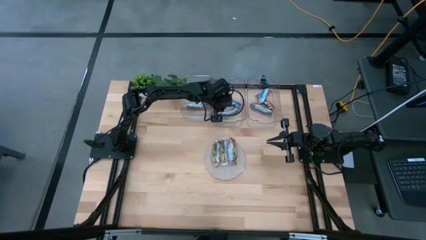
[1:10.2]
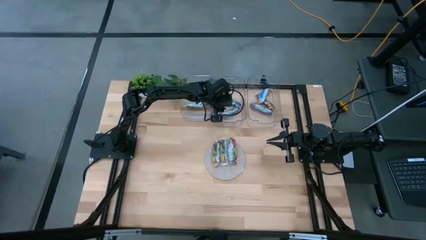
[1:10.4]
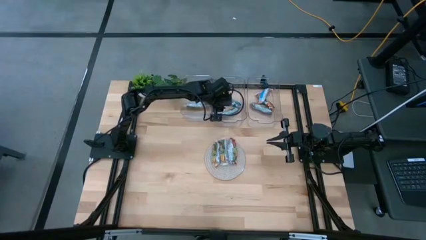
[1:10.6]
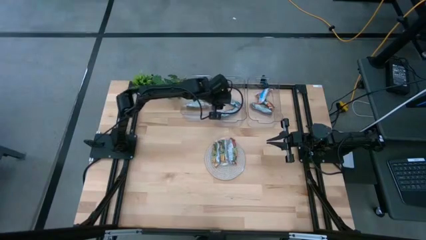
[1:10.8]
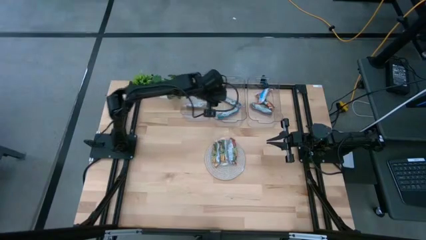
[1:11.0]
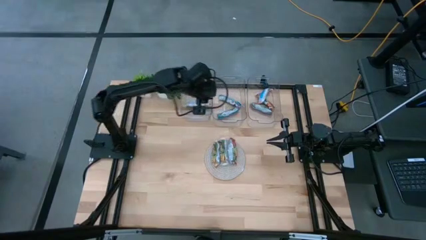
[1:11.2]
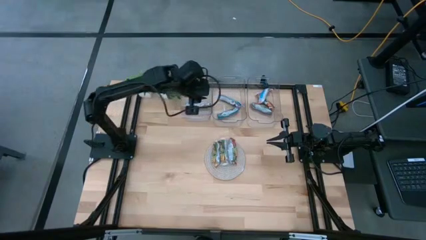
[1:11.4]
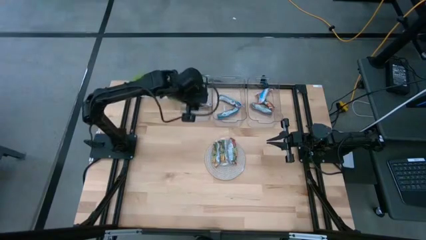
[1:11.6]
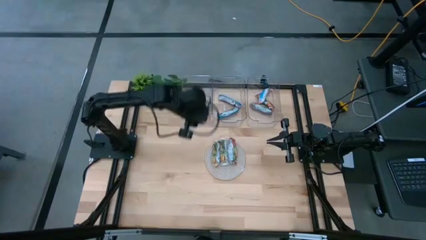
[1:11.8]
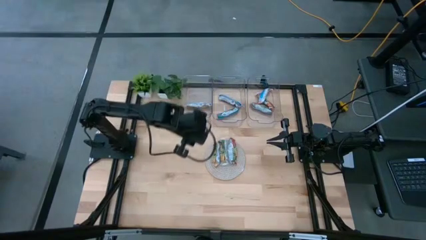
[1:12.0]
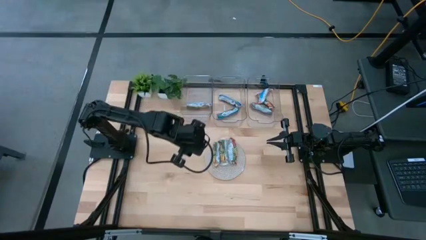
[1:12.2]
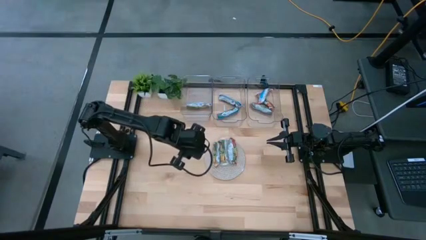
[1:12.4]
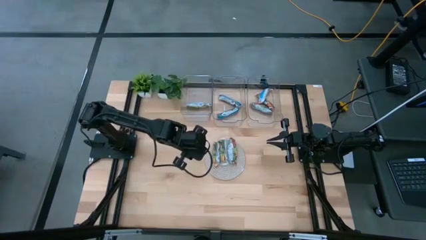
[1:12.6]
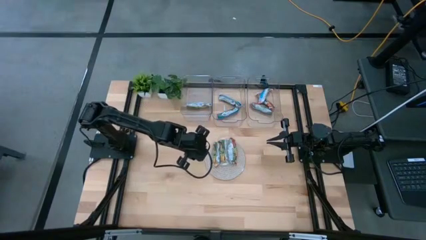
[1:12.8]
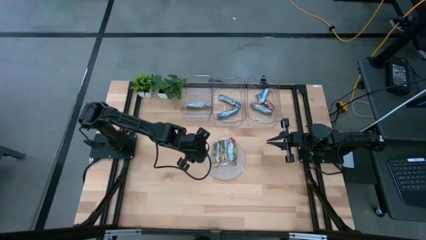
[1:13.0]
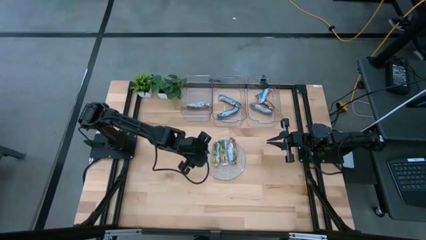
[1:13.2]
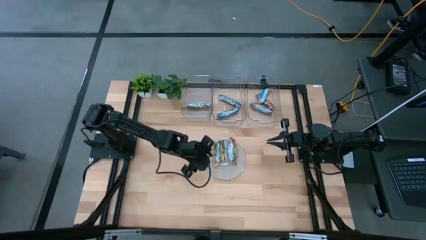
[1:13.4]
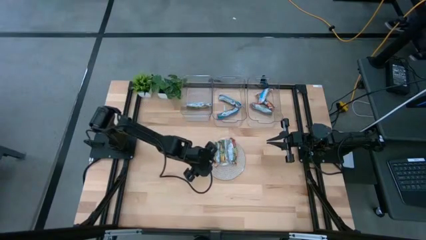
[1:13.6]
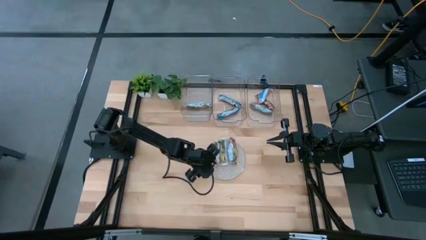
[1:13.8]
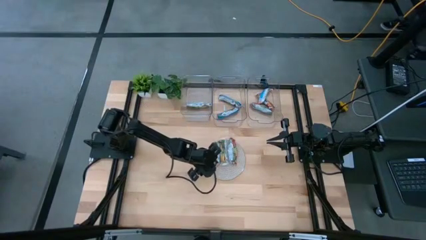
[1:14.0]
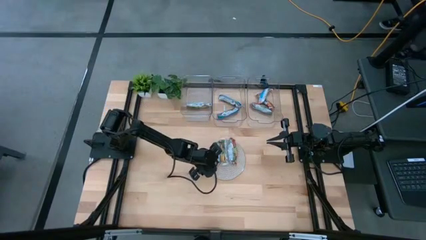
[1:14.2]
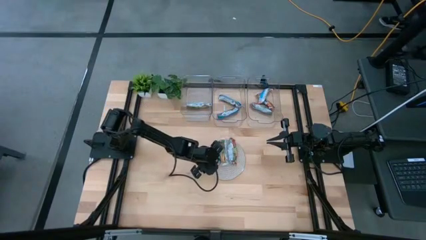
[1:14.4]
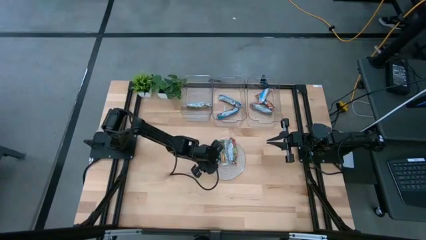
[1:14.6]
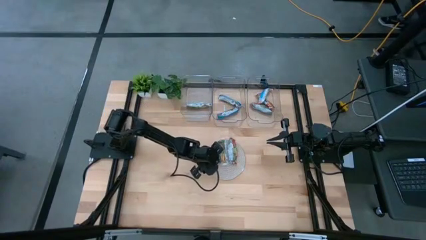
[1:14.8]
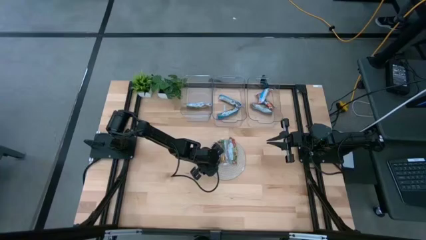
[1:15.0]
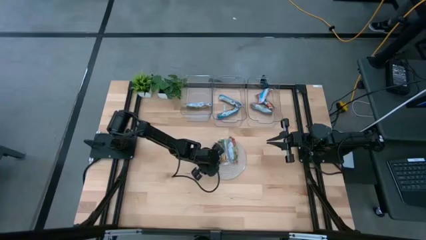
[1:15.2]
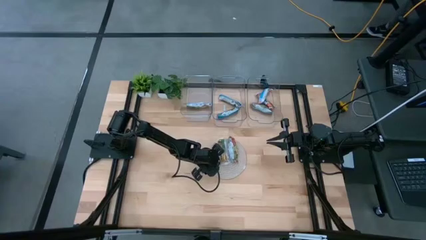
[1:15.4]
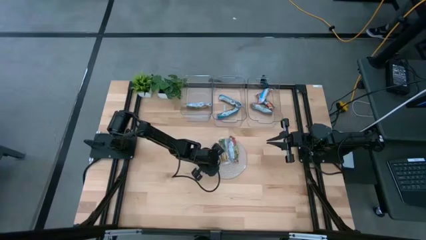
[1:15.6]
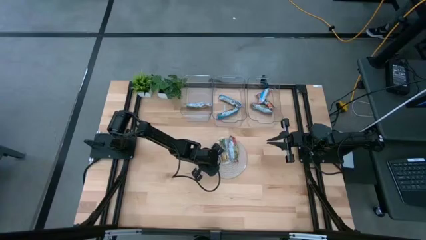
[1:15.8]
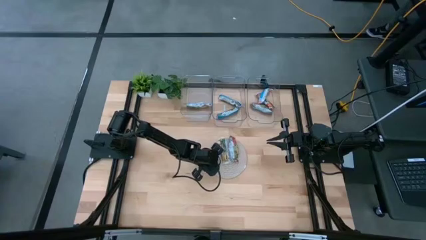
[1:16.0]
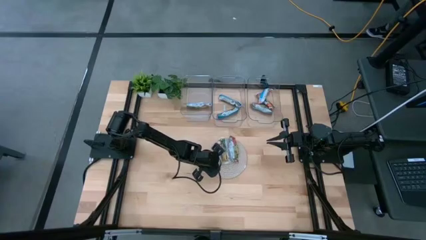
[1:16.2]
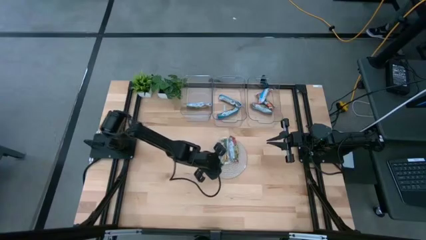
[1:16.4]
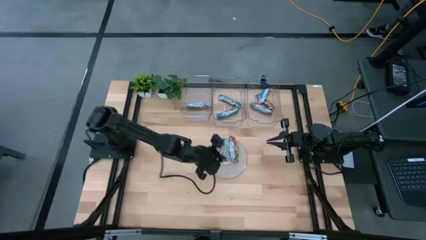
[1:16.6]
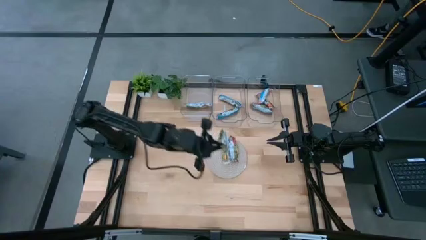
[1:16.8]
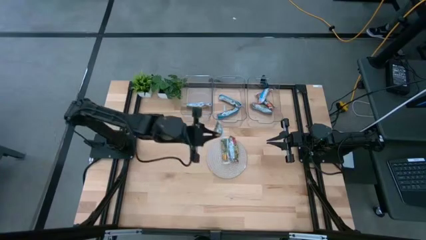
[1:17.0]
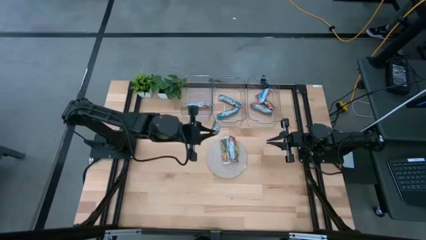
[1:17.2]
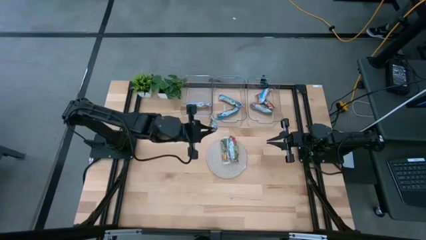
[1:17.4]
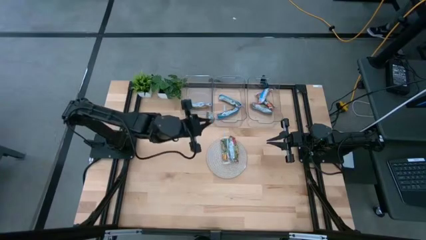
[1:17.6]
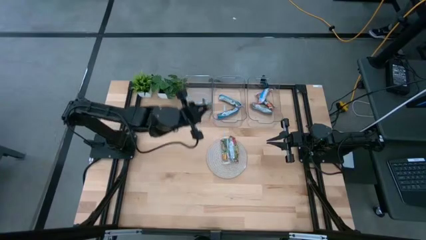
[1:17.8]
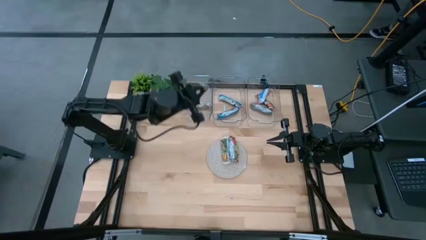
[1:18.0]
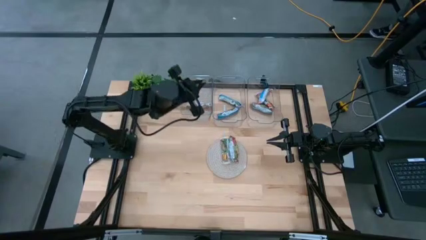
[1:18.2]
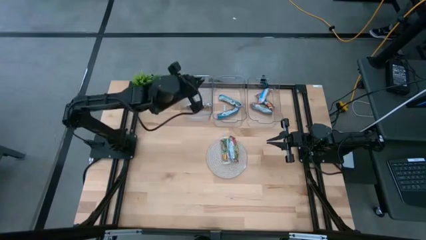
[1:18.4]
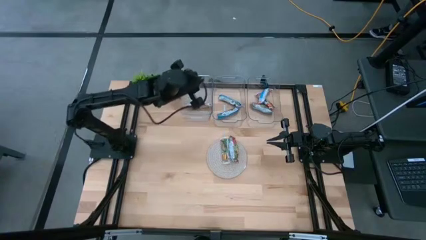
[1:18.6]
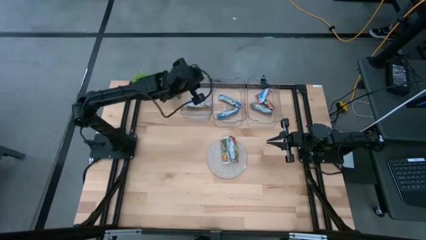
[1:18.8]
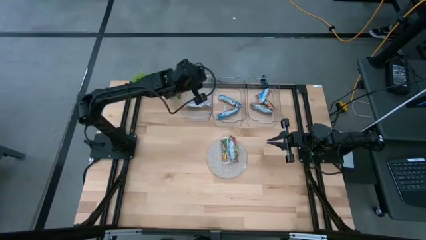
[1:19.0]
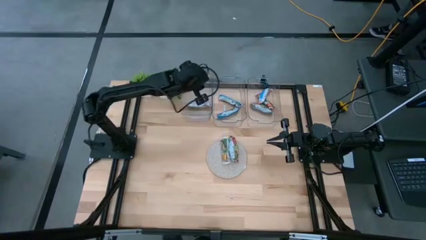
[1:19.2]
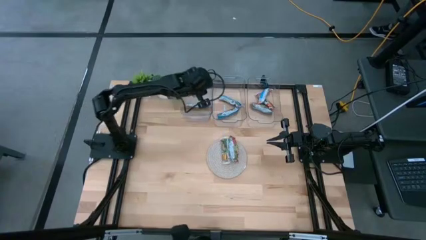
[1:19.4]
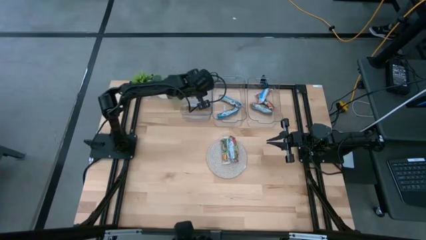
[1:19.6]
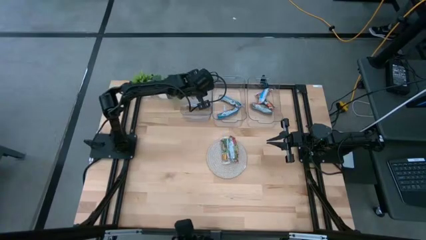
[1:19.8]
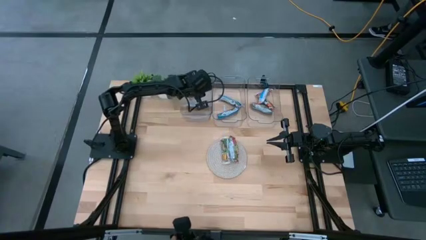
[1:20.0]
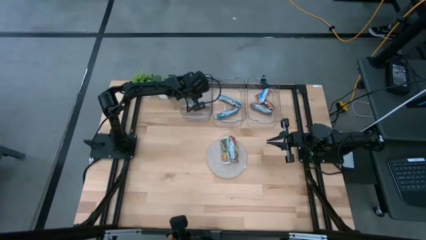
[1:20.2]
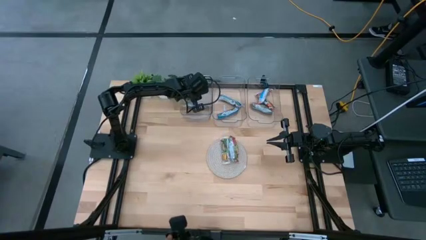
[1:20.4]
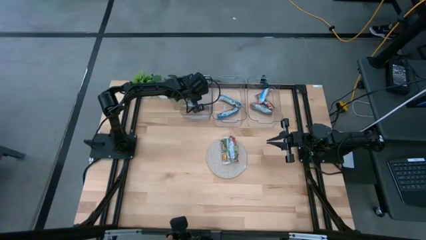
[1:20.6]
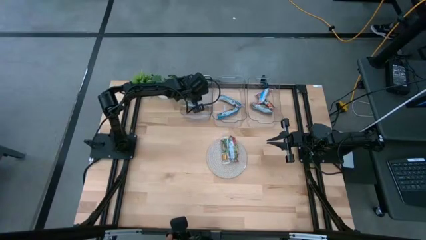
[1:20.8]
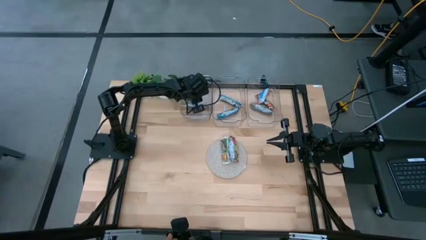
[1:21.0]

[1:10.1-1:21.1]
Task: Pick and place Granola Bars by type
Put the yellow granola bar into the left transparent bin

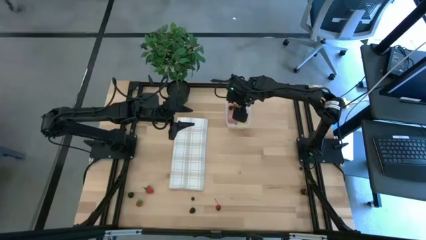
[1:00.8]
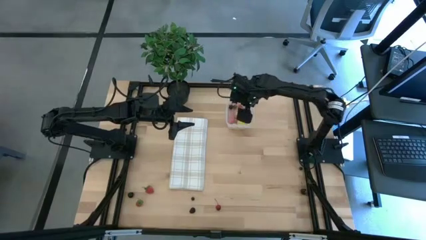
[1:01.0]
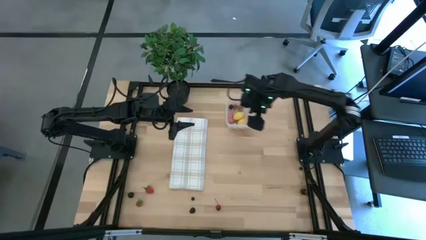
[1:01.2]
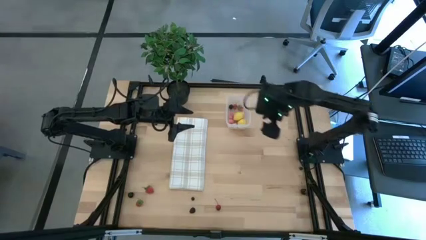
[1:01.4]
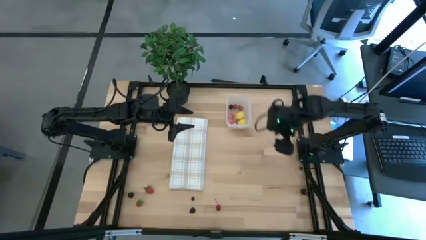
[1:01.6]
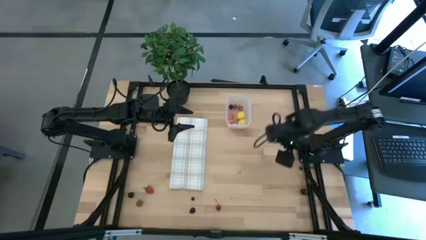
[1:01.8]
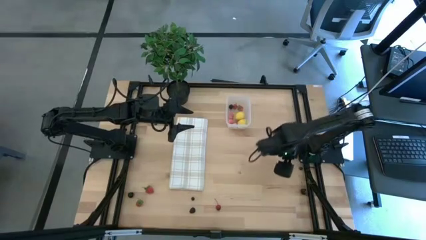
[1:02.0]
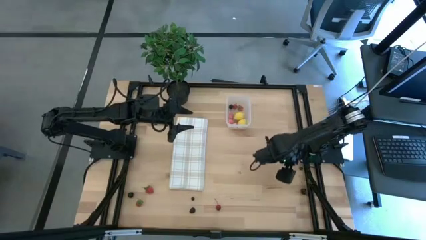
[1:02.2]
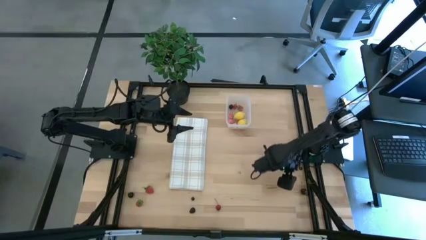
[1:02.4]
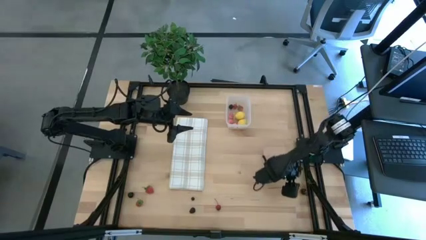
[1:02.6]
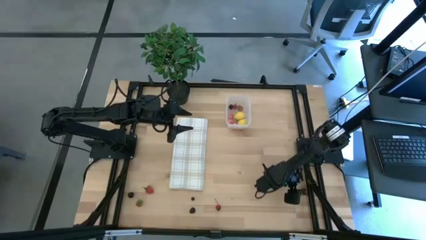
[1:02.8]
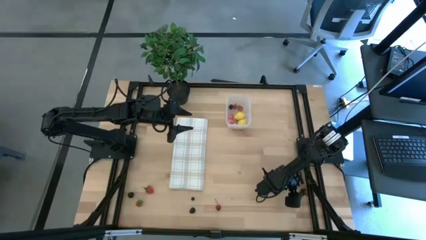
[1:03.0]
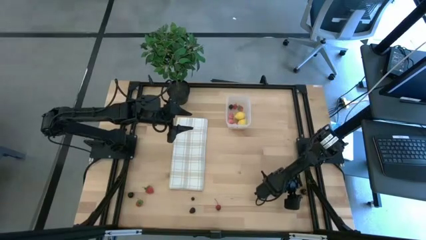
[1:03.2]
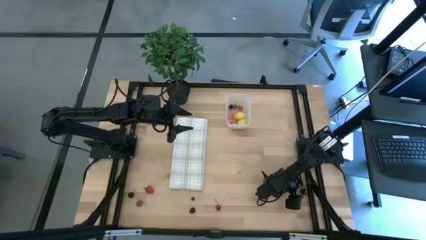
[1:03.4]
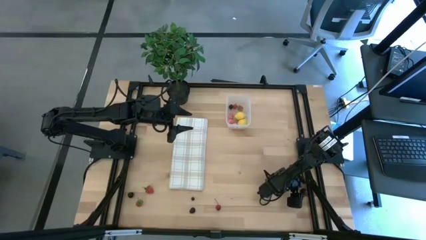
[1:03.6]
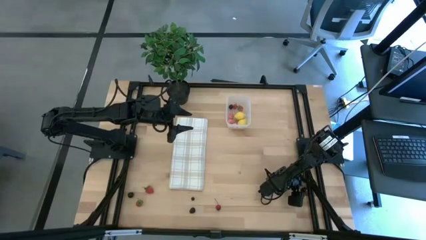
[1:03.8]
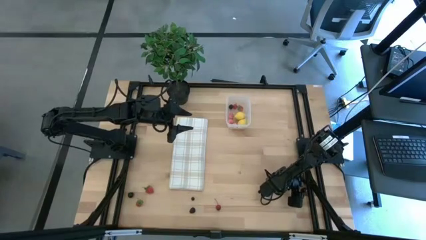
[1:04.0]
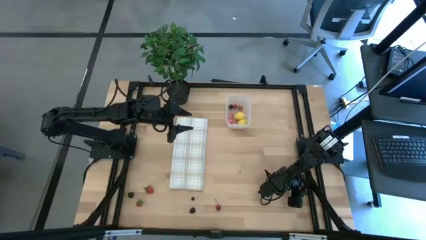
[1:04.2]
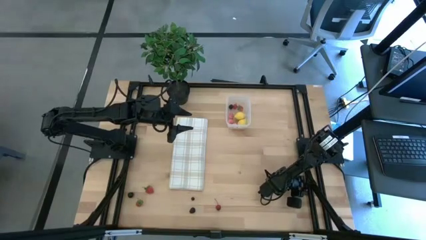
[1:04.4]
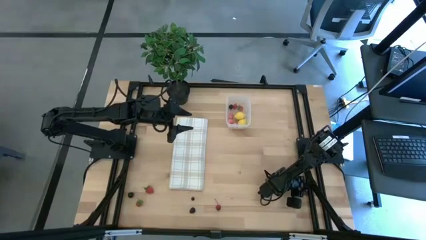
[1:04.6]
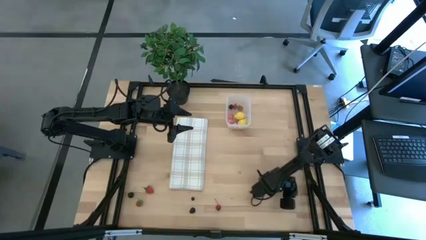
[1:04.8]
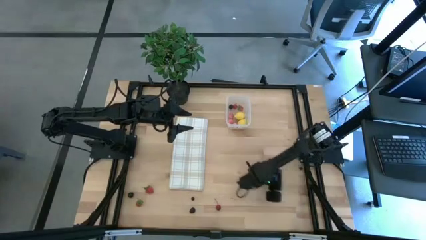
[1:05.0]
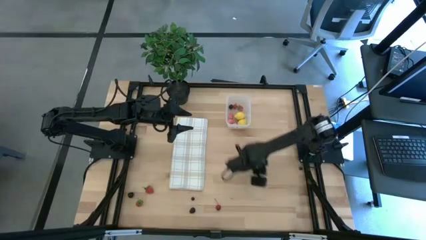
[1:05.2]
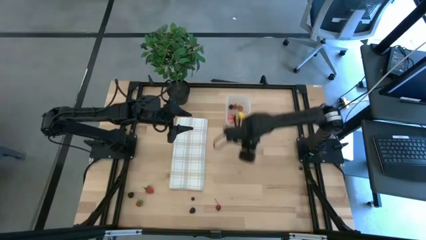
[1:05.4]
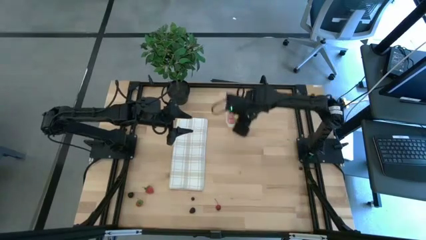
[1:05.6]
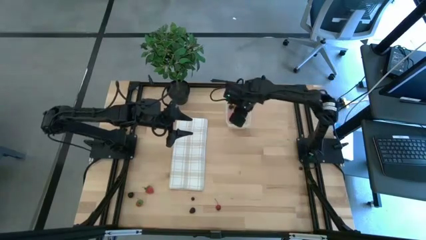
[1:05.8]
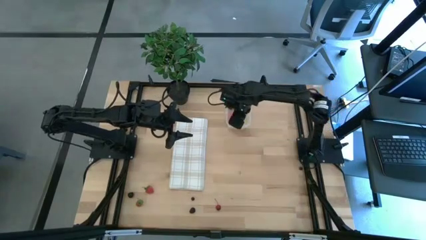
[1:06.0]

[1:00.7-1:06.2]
Task: Pick and placing Produce into tupperware
Put the right black cherry into the transparent bin
